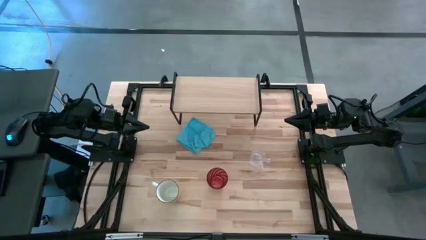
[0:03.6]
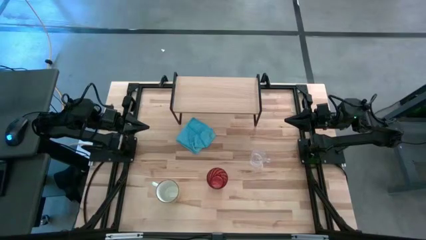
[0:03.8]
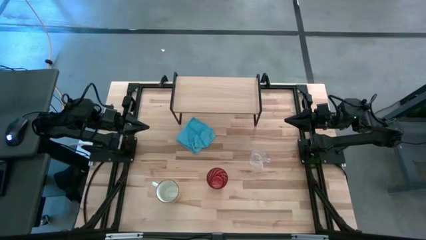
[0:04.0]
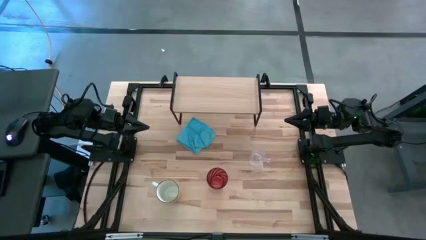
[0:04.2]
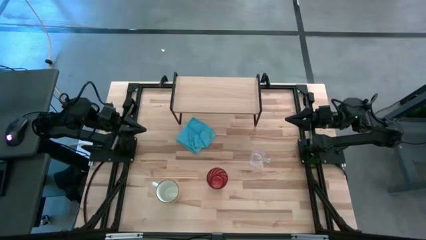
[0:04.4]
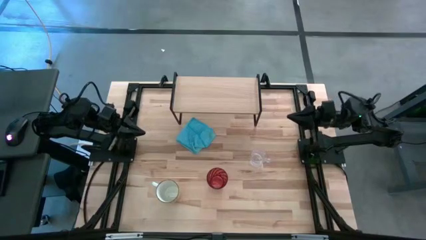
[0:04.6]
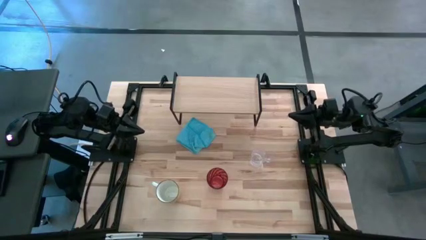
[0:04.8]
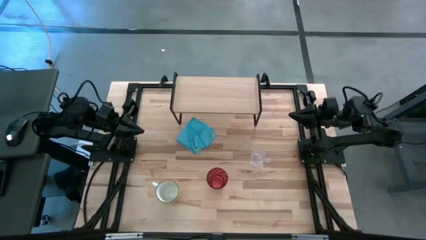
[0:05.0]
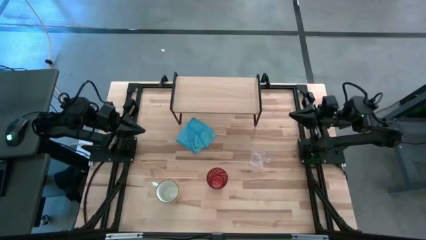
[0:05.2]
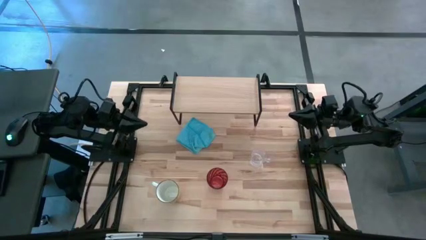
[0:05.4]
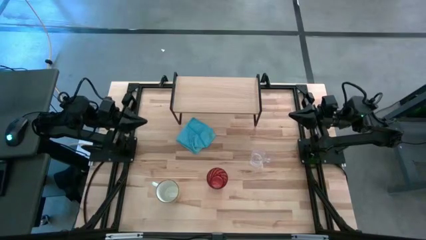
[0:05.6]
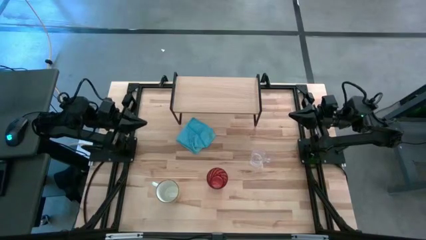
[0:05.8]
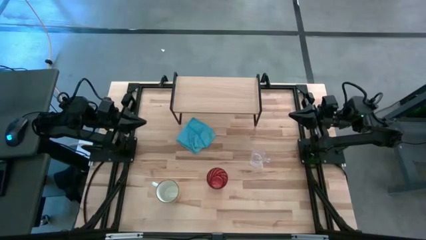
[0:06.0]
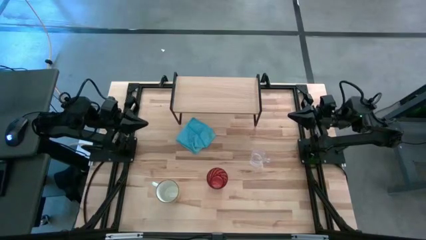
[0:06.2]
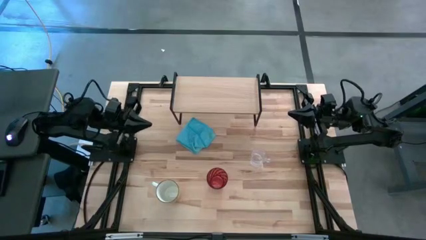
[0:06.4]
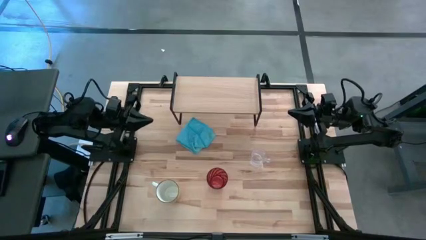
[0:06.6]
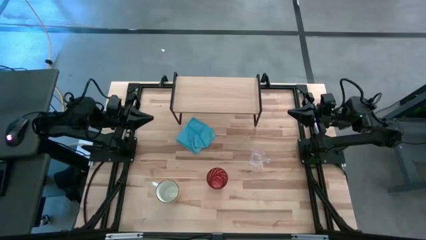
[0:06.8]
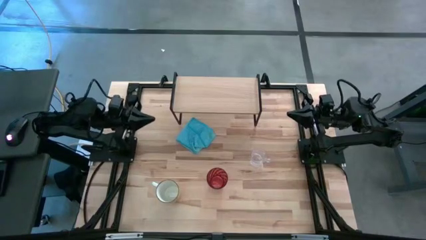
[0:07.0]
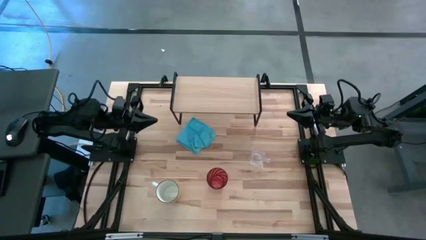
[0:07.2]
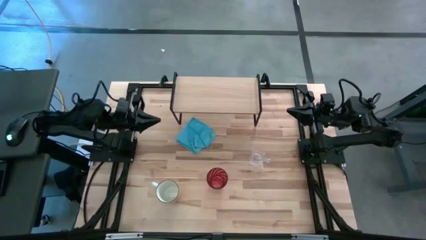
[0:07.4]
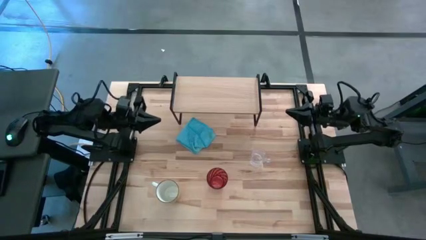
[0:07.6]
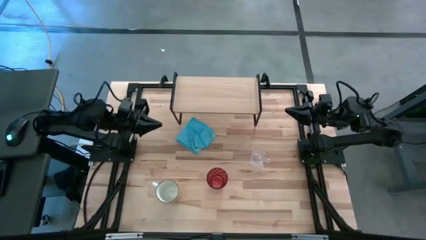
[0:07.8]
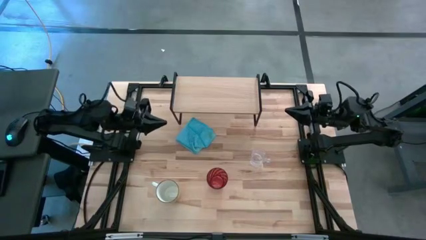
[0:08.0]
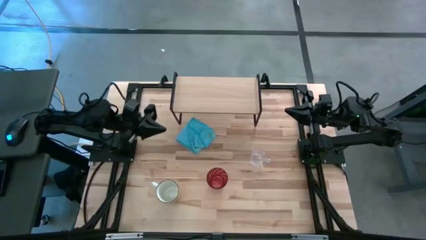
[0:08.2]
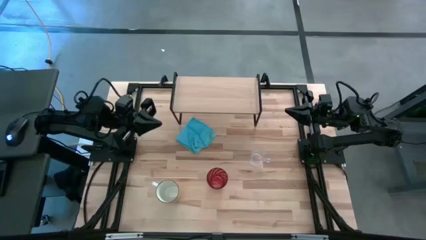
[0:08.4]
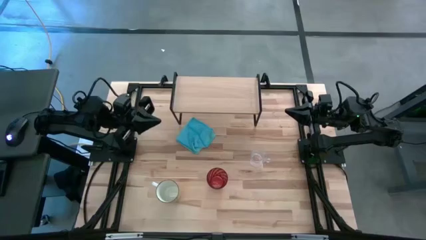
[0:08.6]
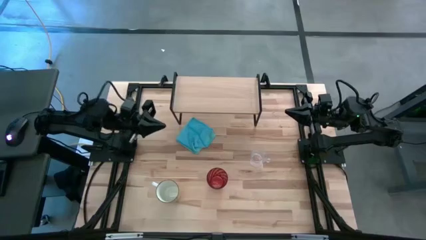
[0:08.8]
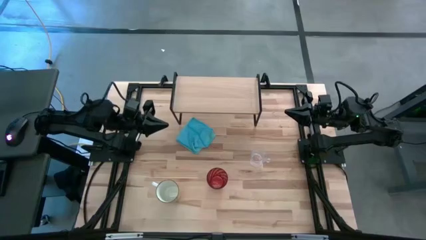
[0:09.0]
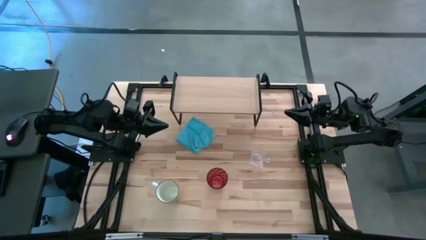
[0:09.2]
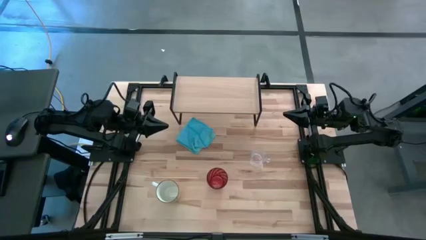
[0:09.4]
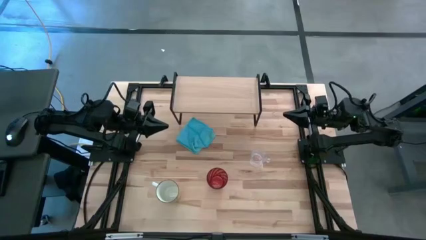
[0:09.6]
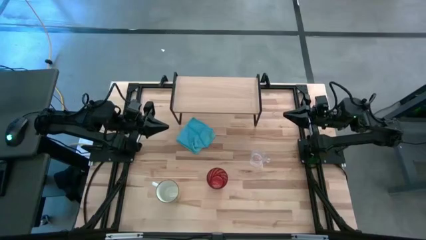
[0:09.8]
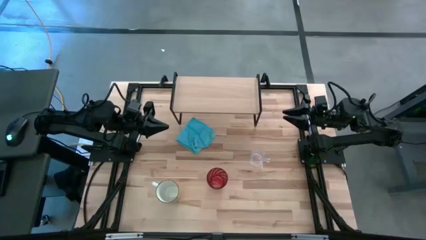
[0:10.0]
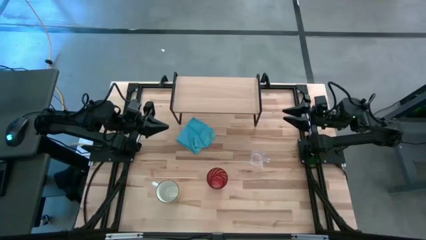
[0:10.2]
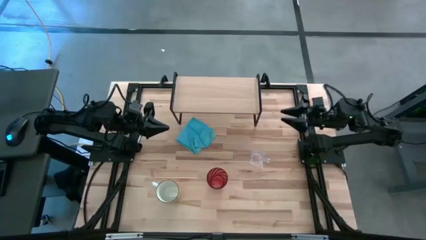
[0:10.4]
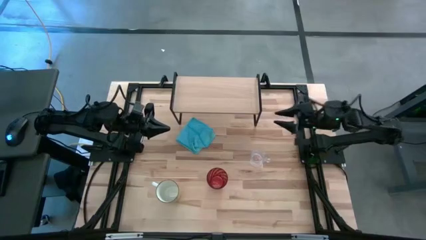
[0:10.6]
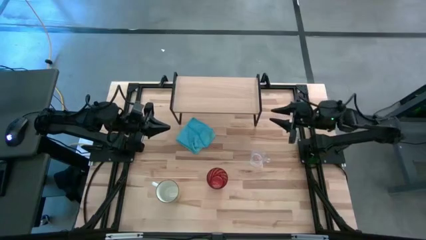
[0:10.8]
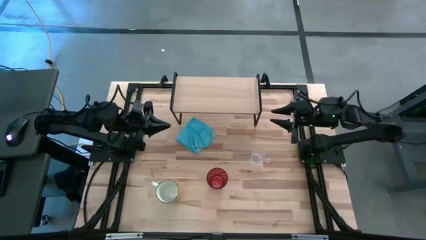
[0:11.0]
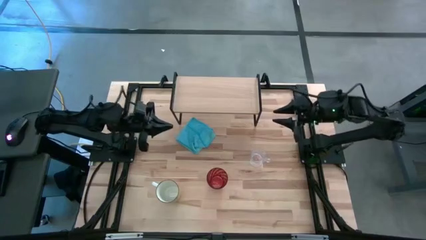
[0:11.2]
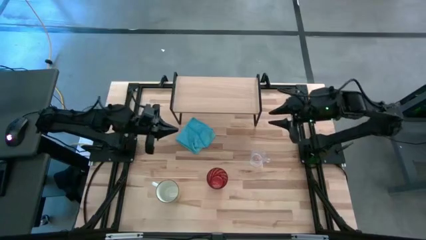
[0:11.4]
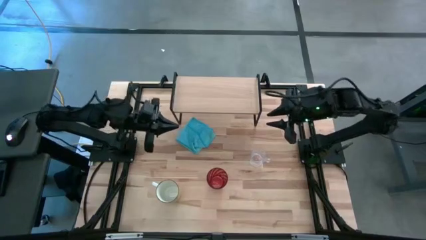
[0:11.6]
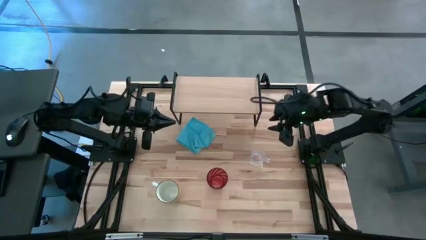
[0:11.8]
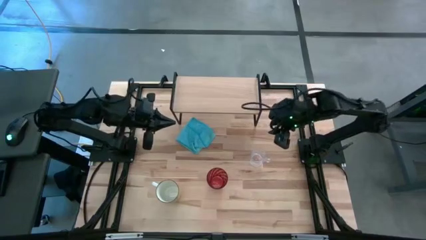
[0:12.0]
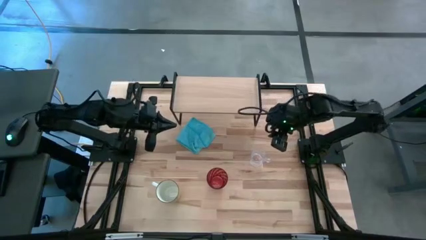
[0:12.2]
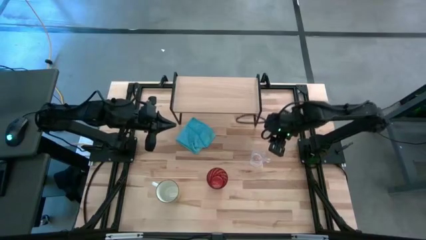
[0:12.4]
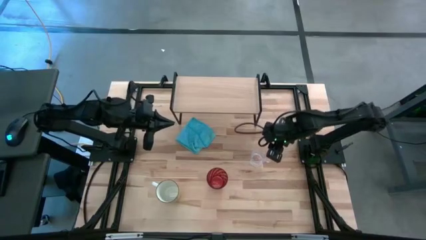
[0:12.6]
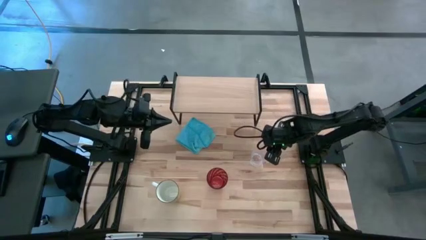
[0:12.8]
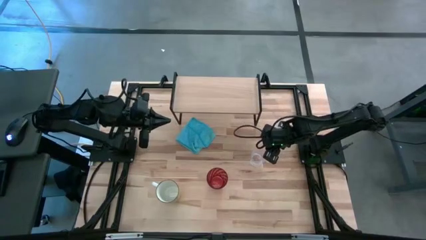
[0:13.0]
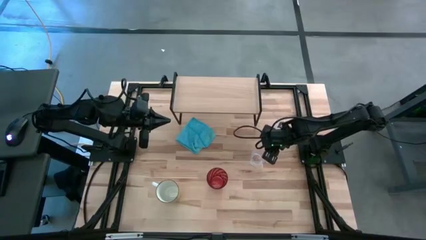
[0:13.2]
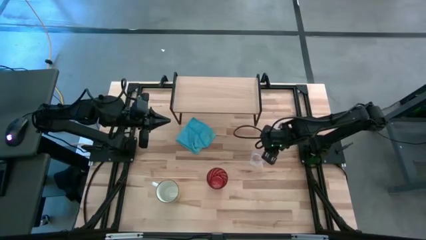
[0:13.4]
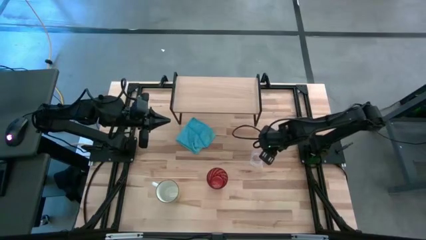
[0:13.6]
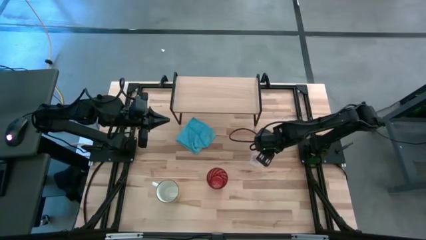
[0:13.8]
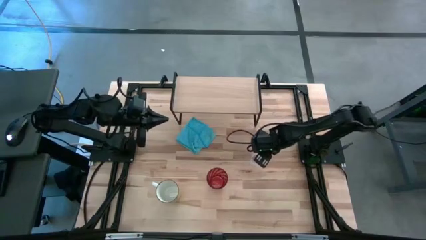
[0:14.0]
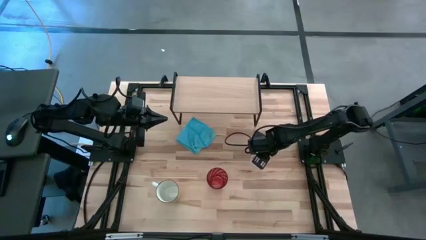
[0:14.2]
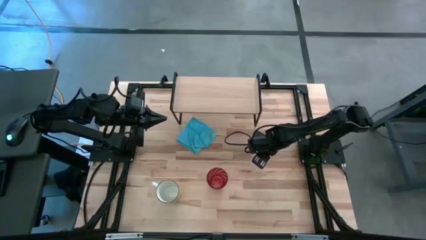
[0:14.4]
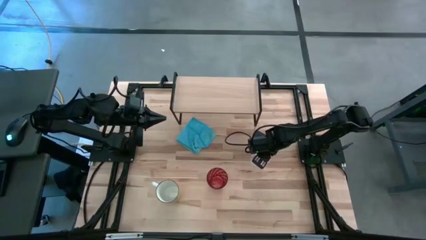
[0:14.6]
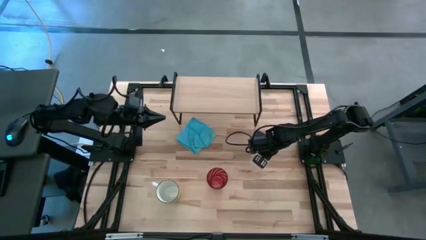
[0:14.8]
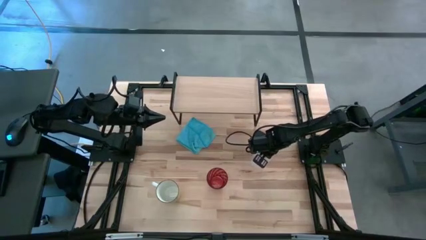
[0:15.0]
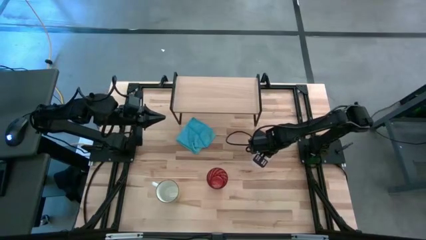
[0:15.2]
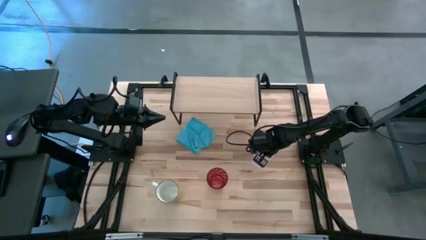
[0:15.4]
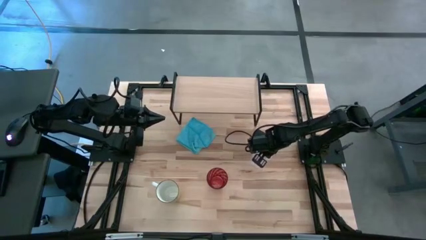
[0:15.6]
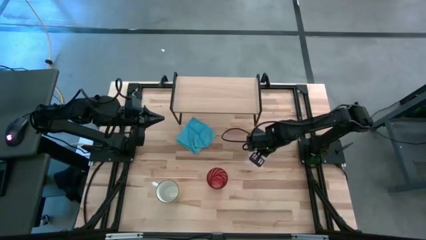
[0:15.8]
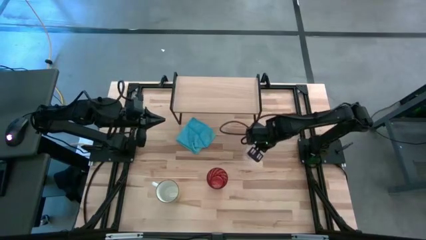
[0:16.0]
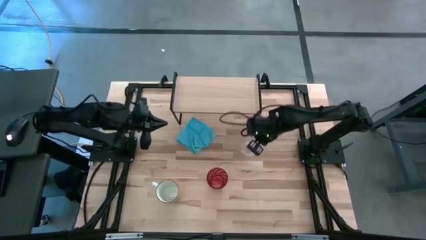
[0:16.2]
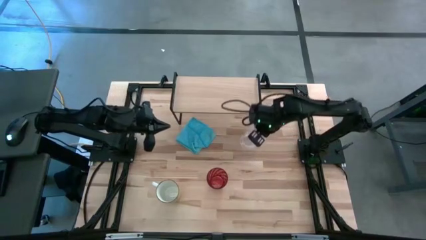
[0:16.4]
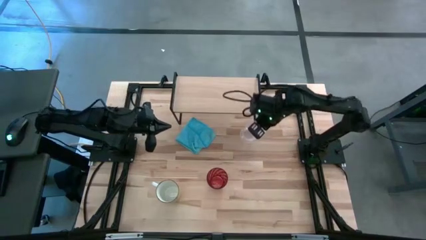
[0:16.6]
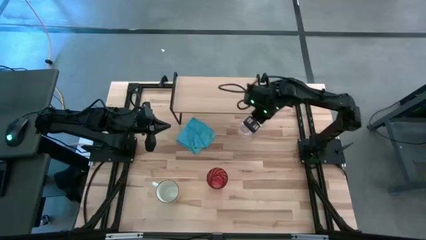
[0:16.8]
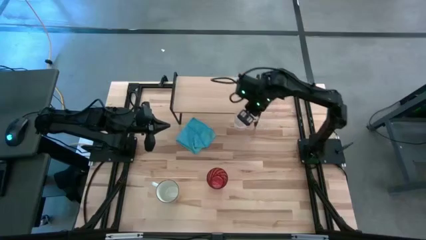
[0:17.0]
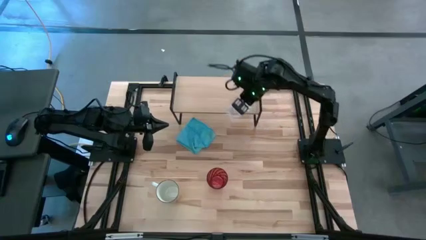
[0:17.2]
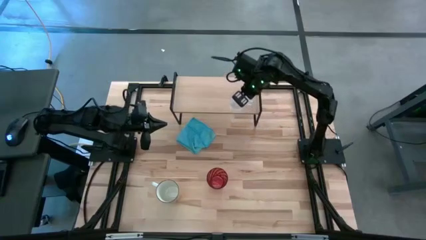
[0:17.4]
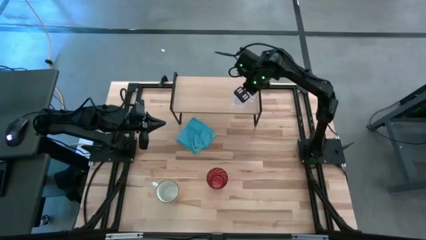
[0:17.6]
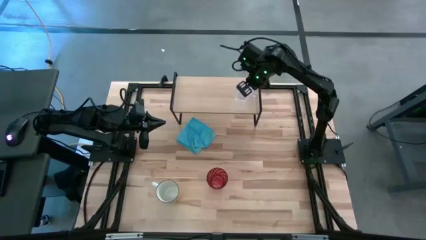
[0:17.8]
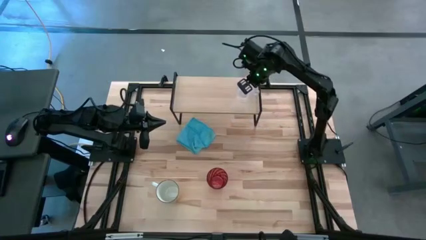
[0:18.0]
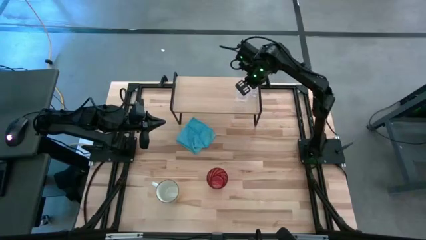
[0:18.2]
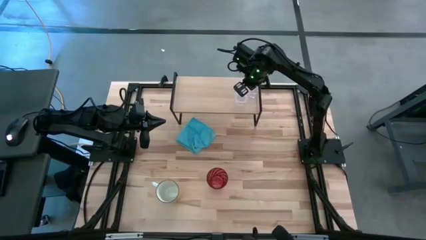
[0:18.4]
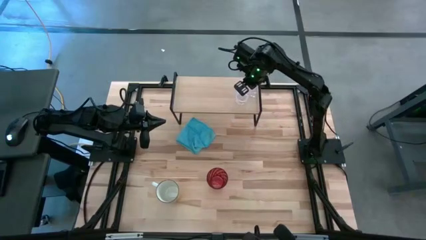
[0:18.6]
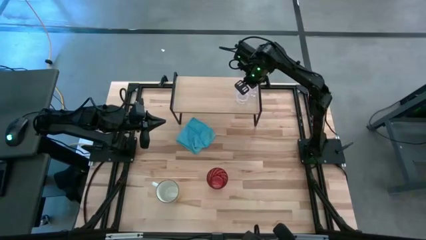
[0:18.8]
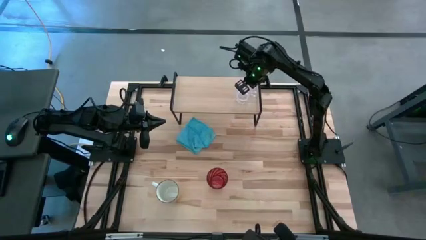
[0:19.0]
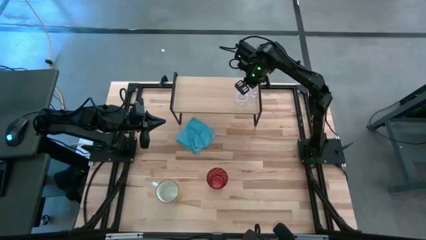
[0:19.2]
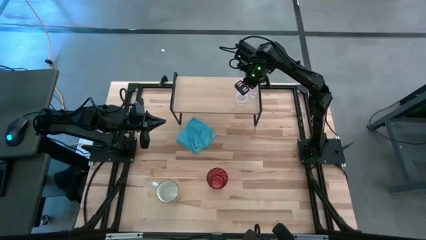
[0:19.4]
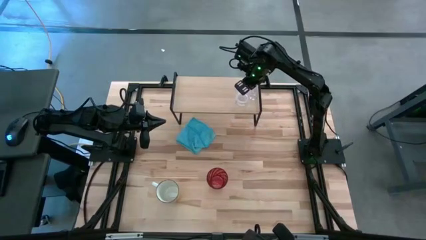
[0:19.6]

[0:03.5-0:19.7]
Task: Stack small to large cups/mugs on shelf
Put the transparent mug on the shelf
